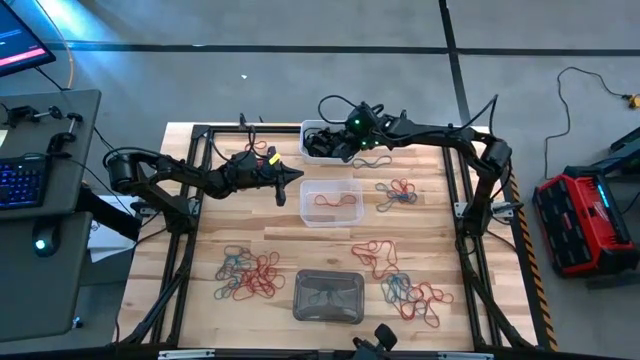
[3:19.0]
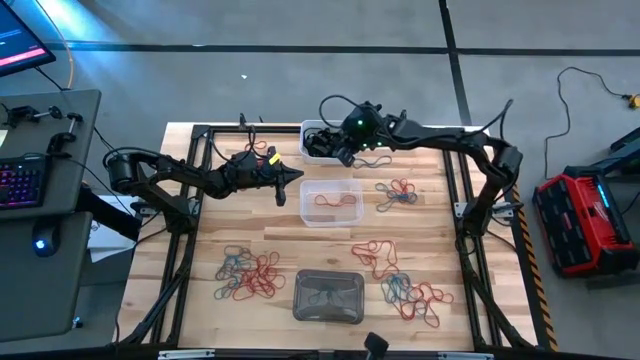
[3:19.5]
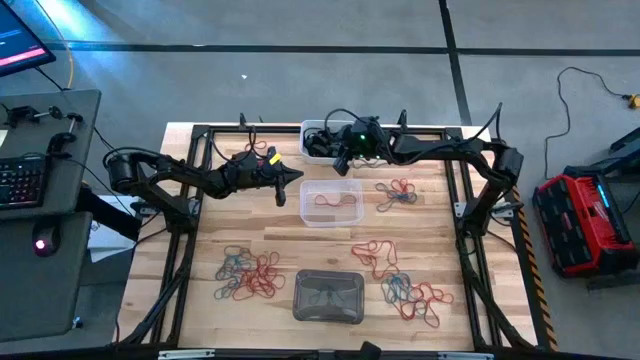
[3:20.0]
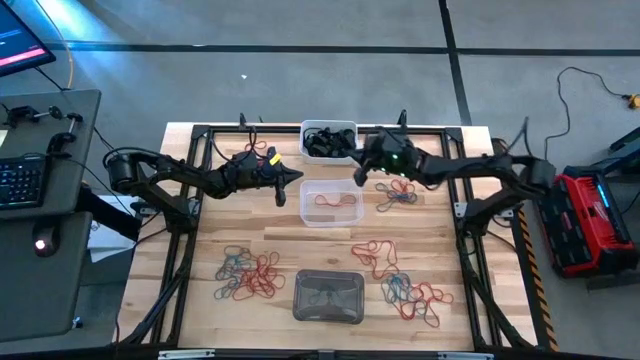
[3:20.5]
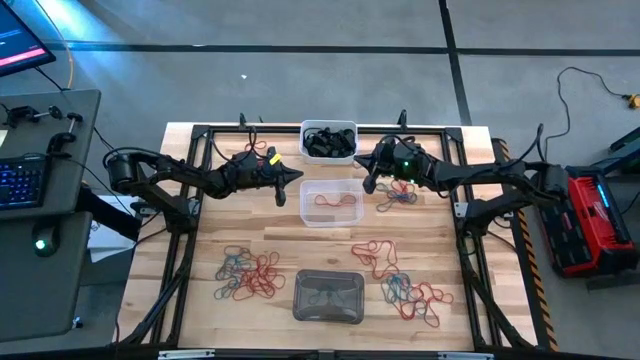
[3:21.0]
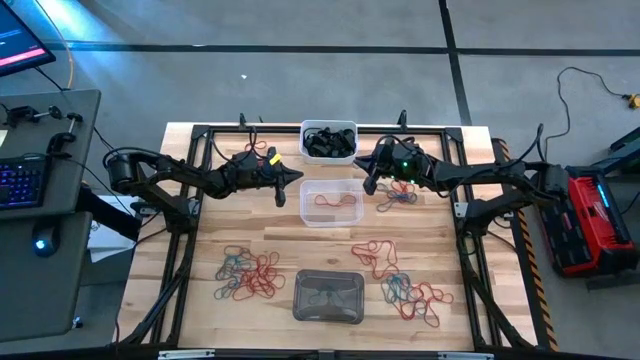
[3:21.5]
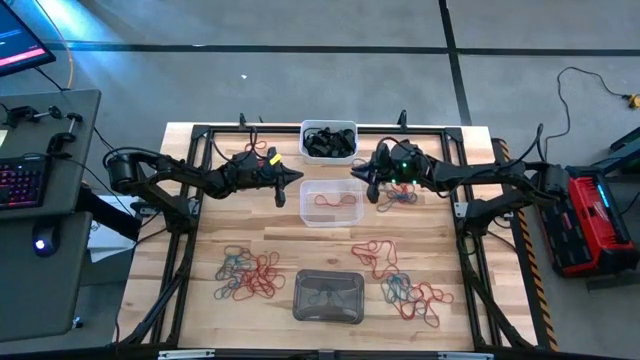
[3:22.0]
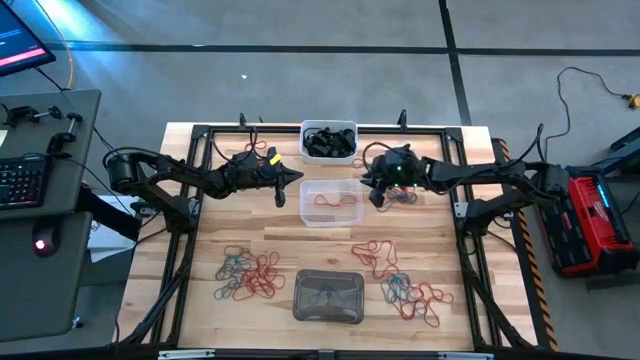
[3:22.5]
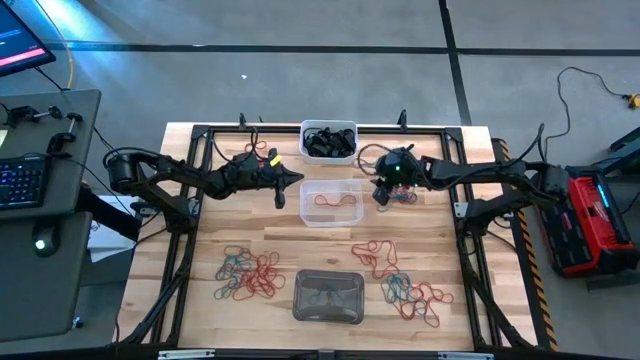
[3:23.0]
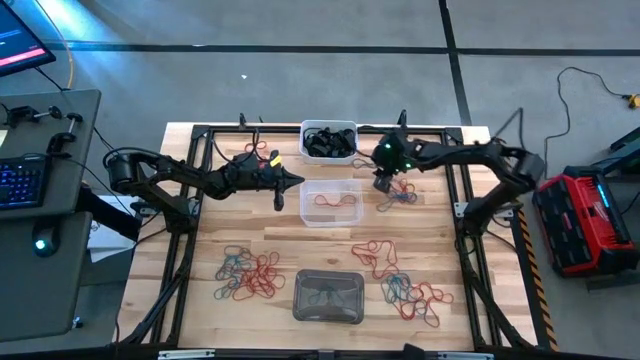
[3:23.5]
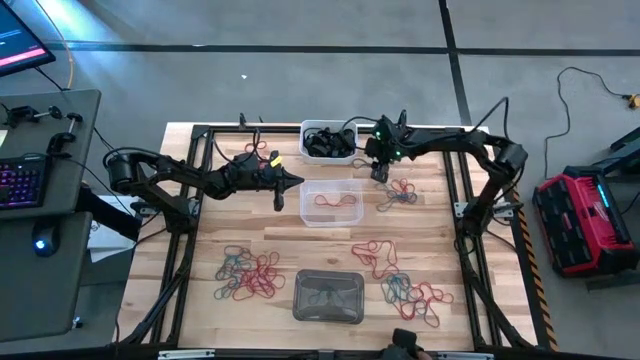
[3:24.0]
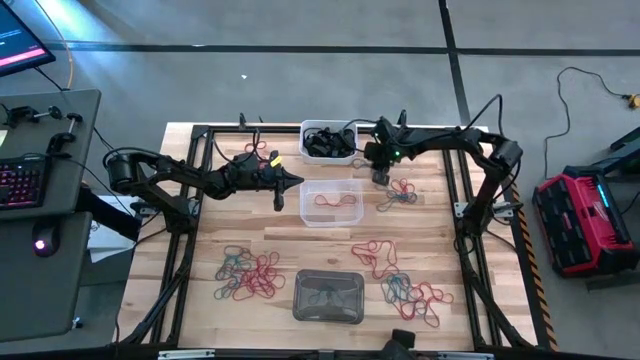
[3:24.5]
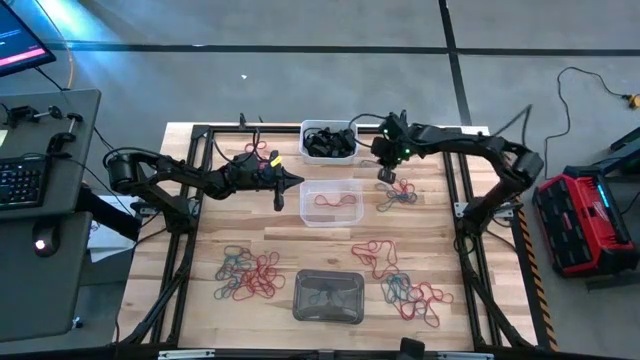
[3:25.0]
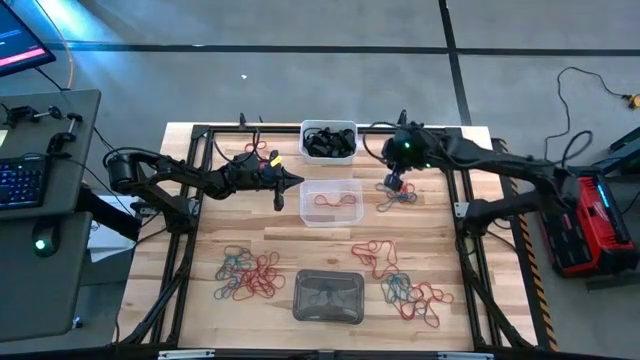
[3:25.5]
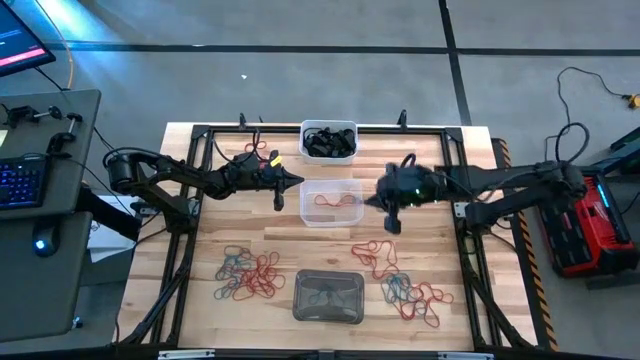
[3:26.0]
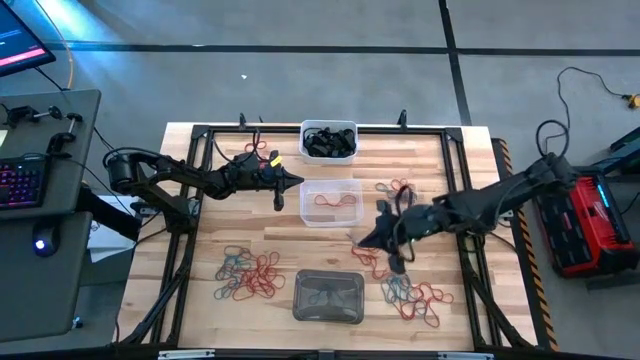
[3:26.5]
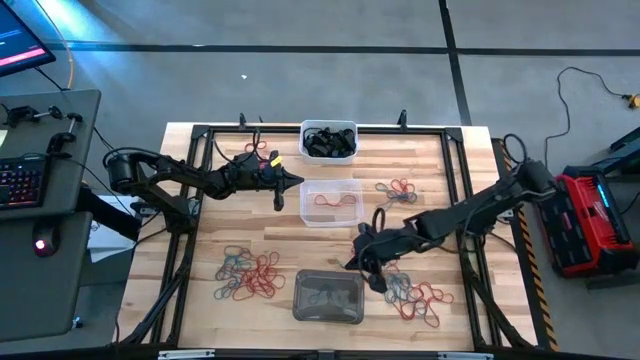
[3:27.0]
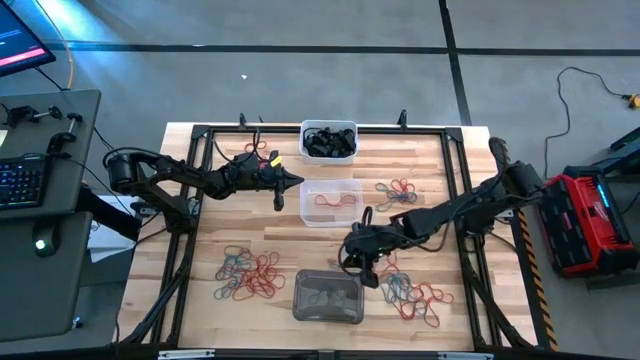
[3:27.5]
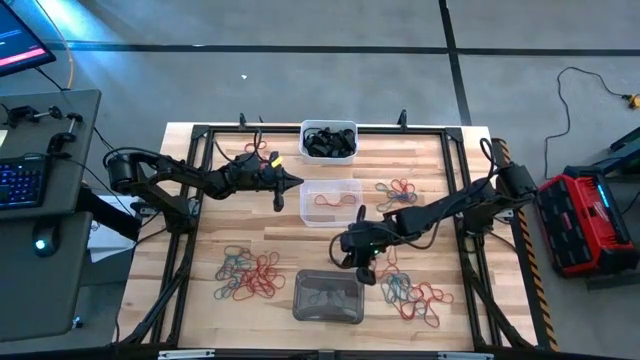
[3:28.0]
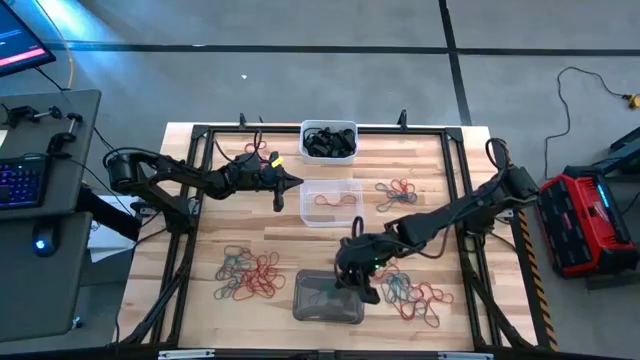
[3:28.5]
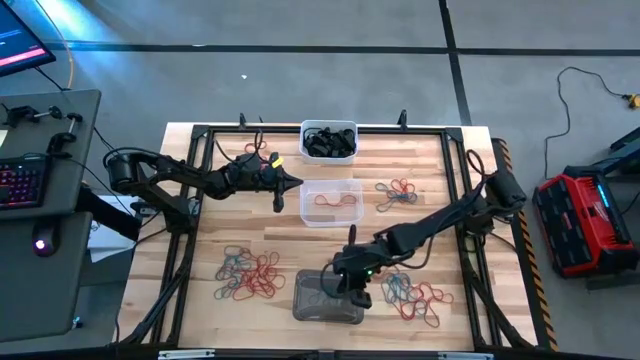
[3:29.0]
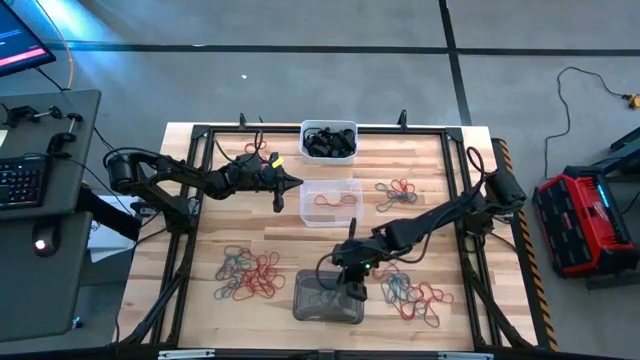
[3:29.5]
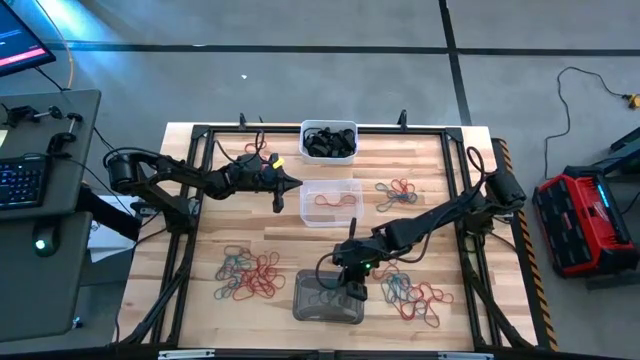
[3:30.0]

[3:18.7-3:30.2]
Task: Sort rubber bands into baskets
Put the blue rubber band into the black bin

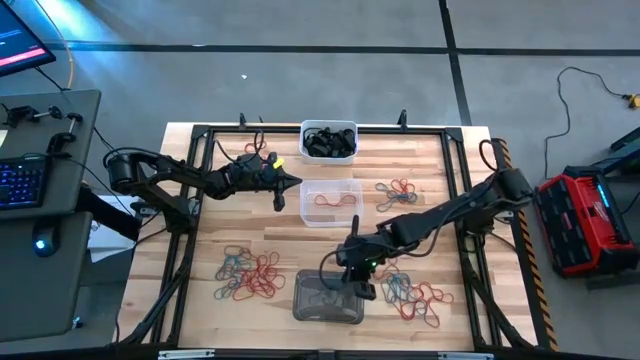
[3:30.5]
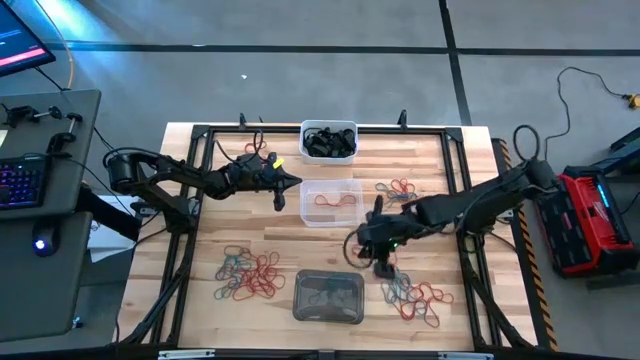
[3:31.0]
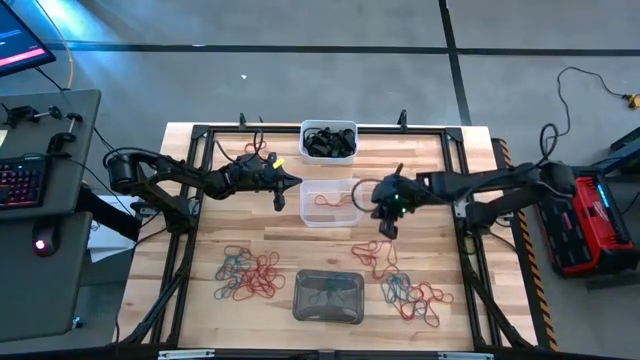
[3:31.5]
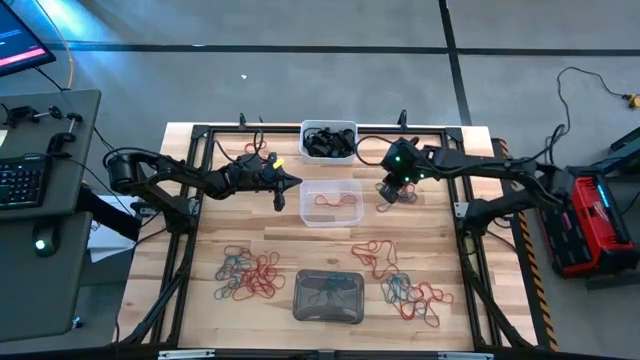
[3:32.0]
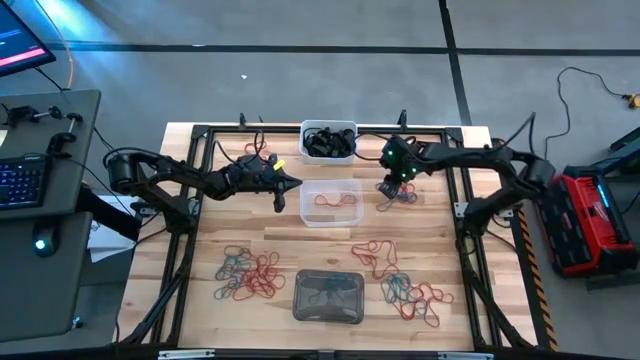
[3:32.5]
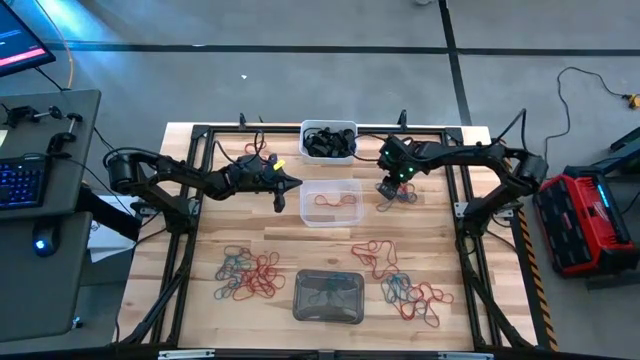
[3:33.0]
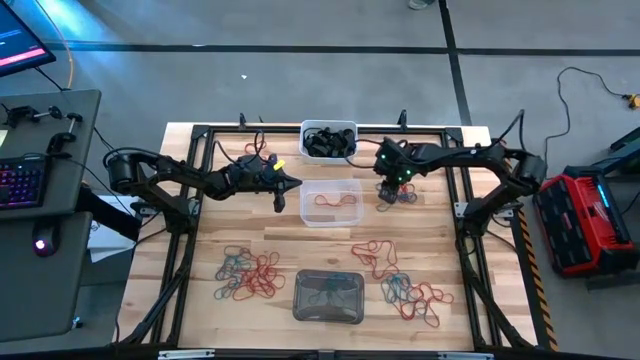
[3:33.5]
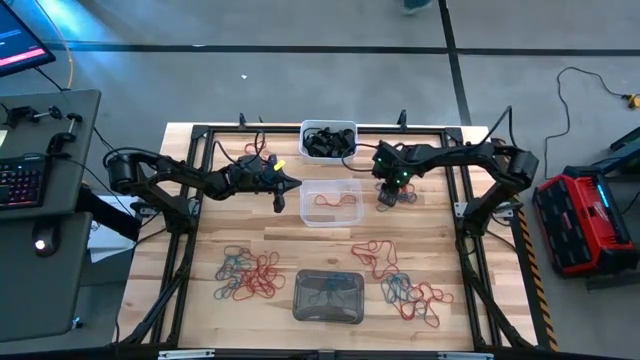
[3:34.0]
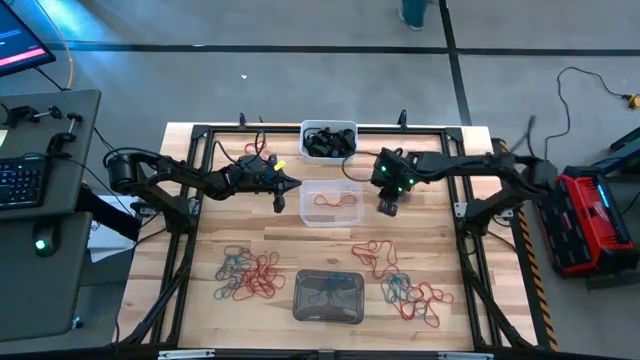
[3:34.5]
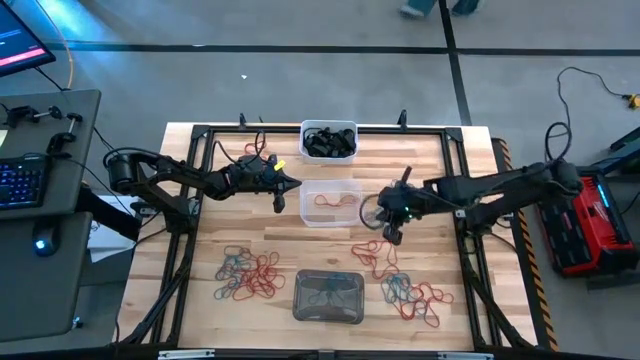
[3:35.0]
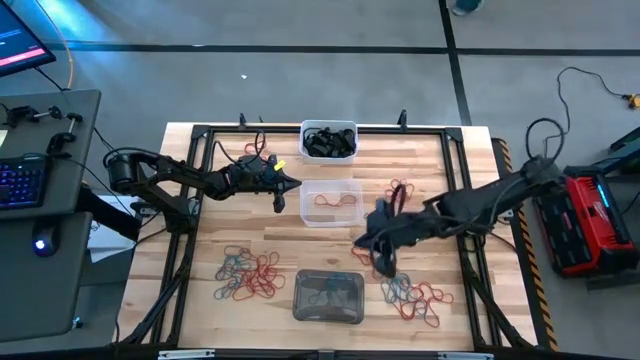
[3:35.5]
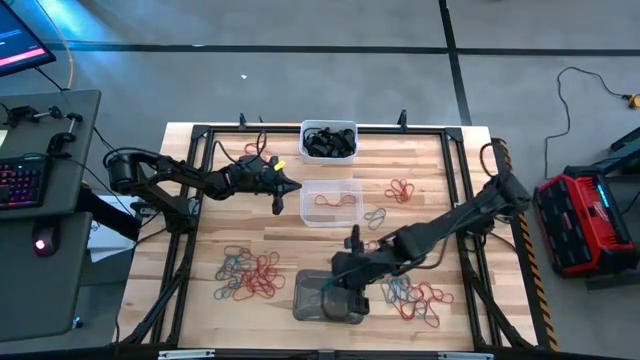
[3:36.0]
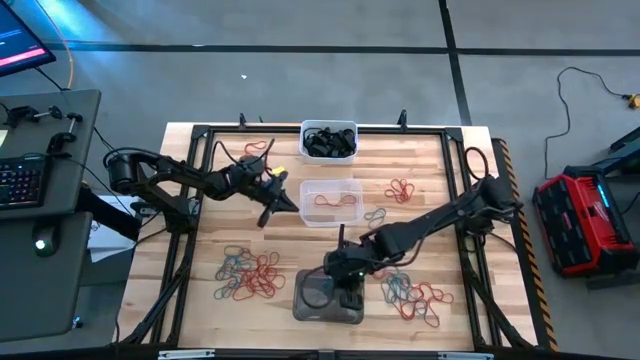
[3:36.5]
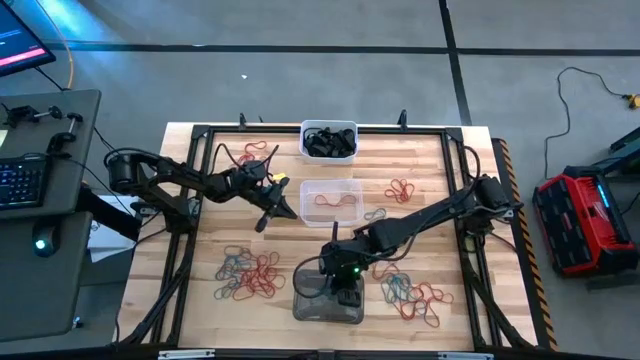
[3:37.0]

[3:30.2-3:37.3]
Put the blue rubber band into the black bin

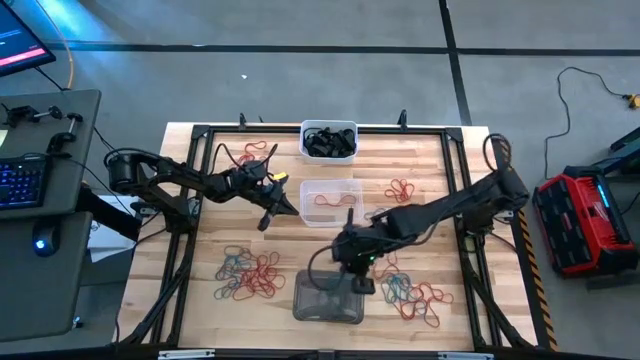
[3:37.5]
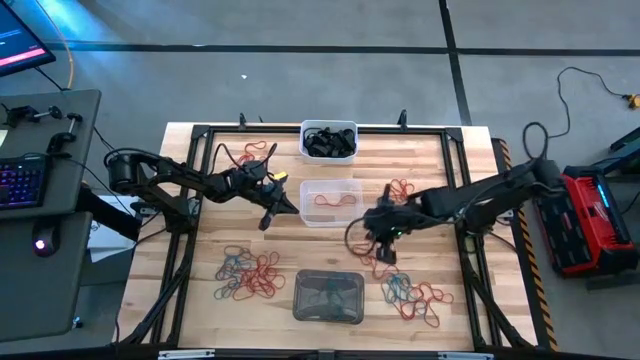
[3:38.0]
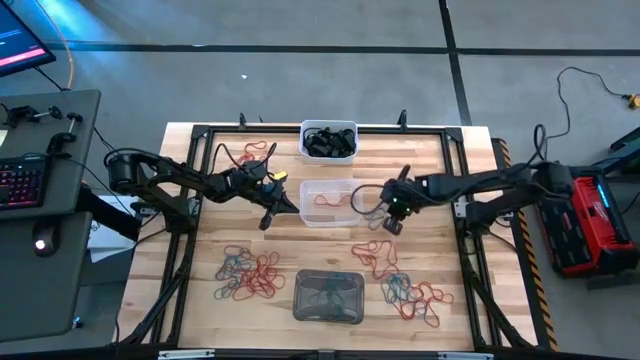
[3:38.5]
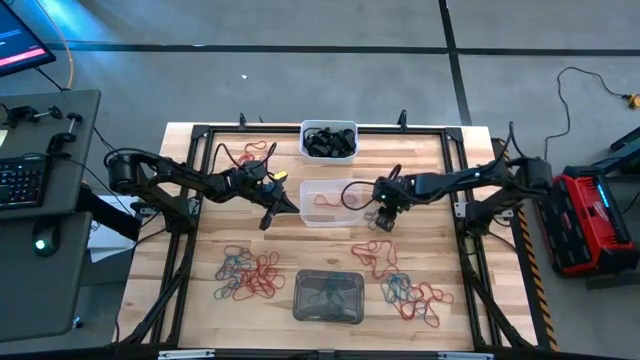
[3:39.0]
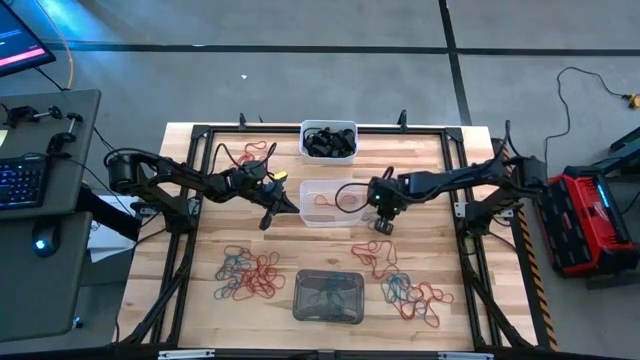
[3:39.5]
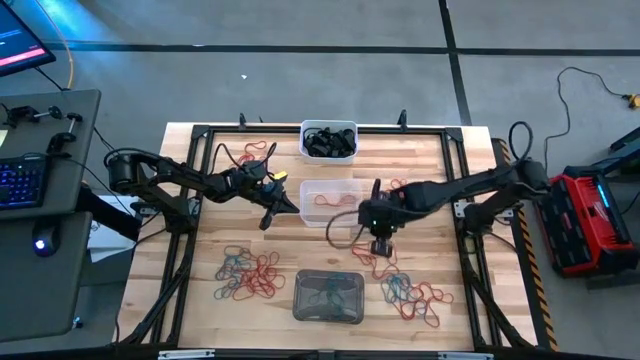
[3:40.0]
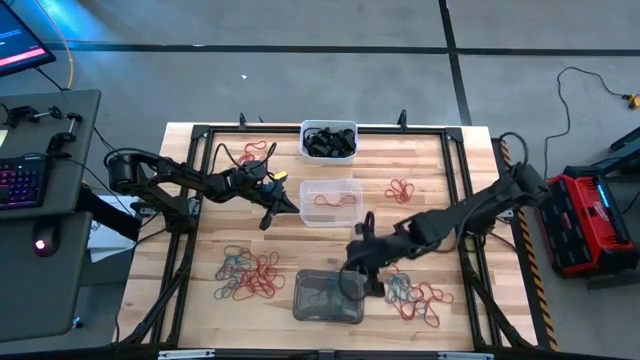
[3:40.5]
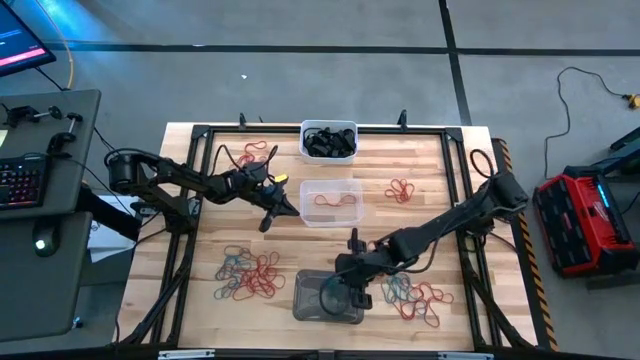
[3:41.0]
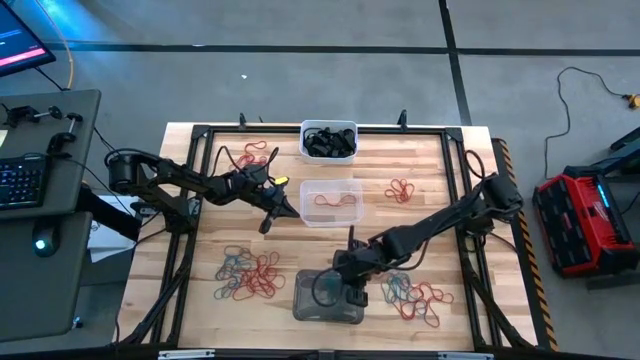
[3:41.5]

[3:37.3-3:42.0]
Put the blue rubber band into the black bin
